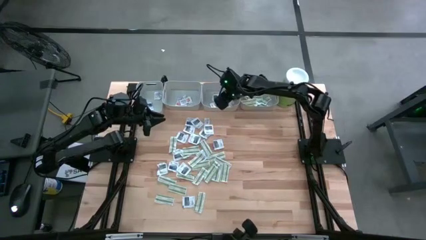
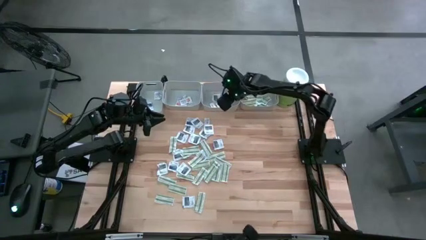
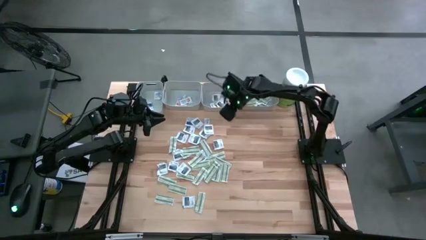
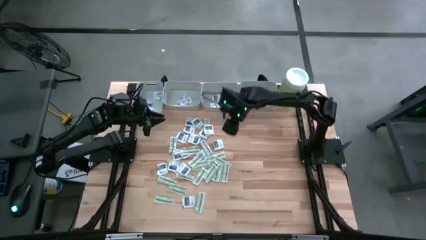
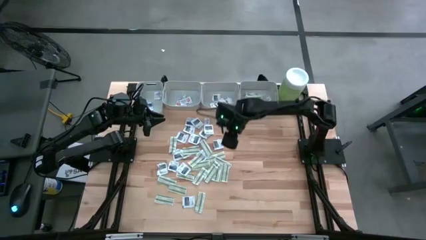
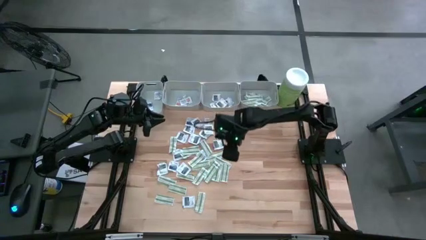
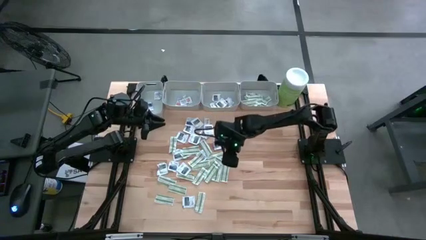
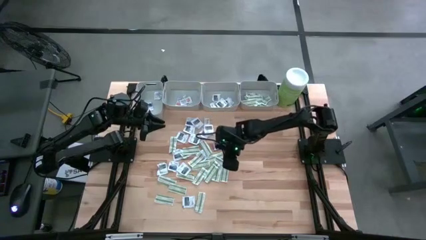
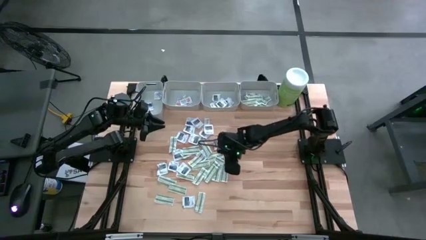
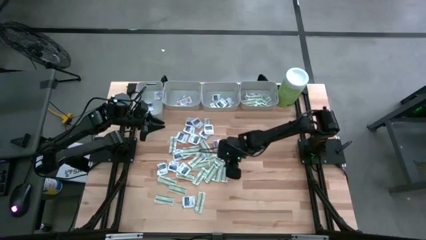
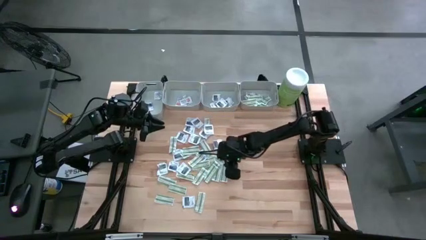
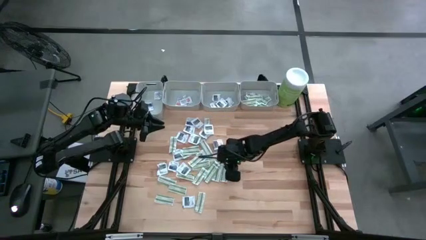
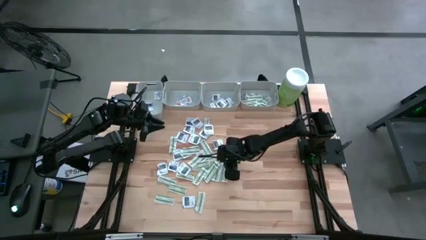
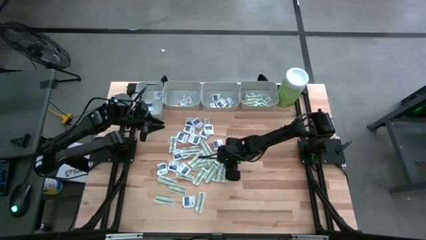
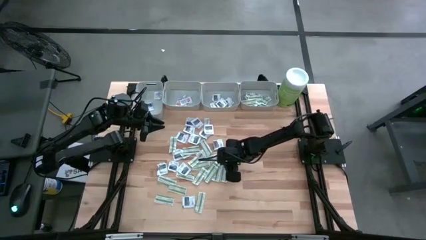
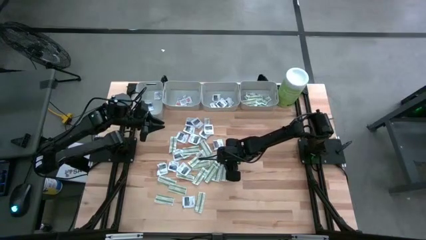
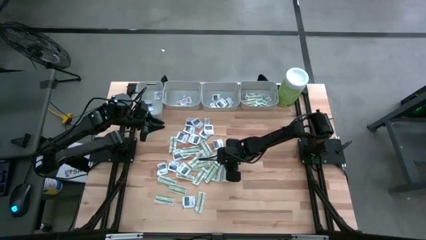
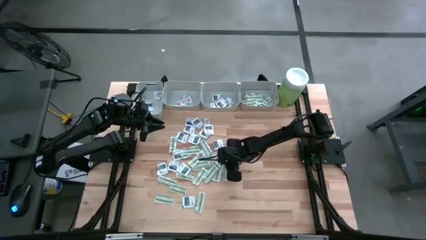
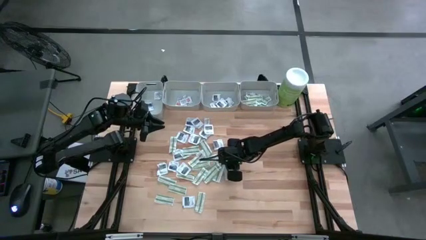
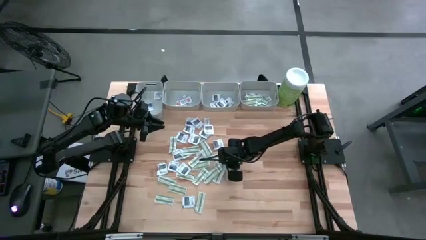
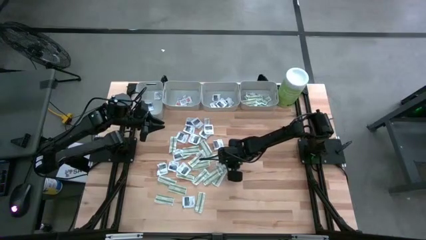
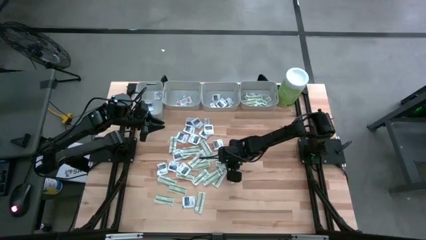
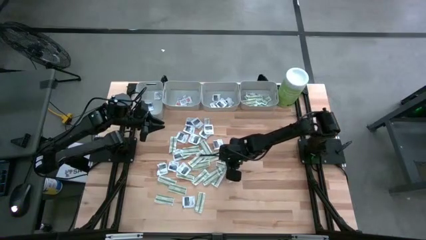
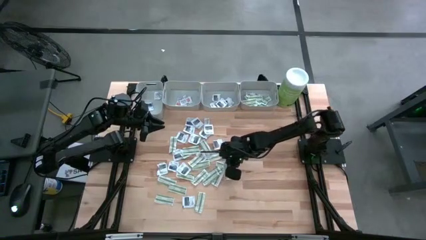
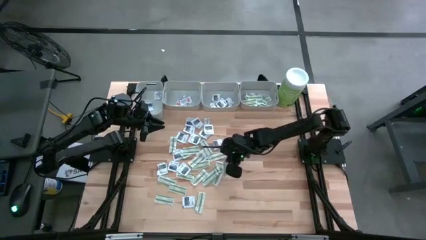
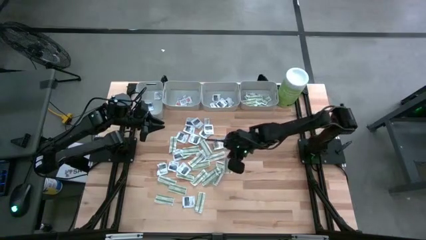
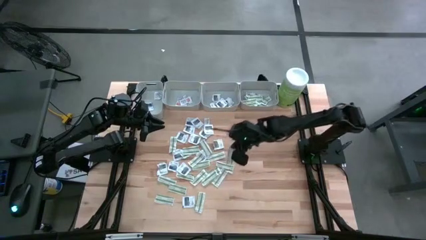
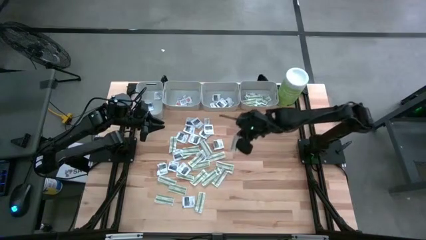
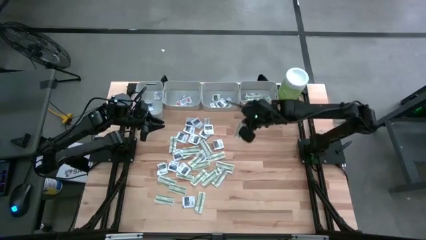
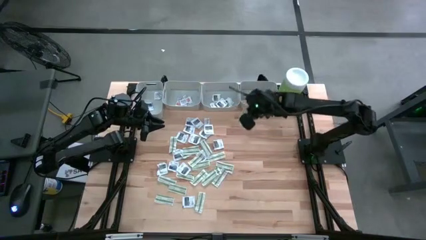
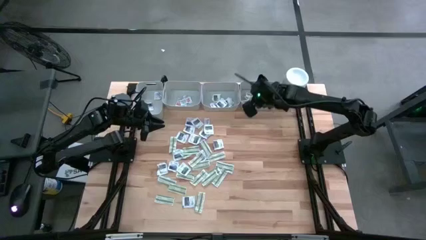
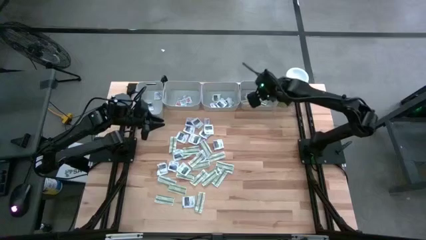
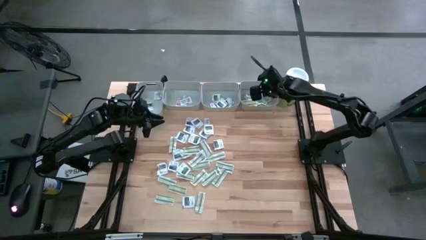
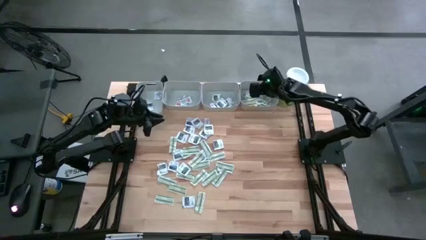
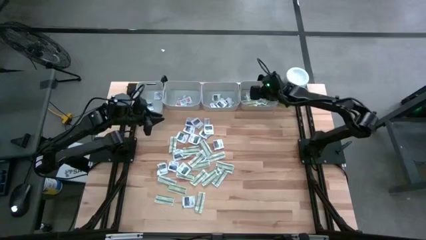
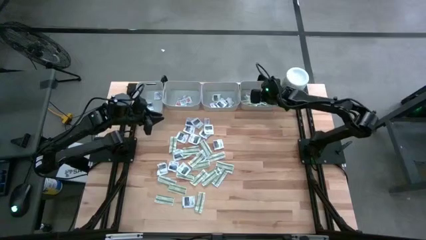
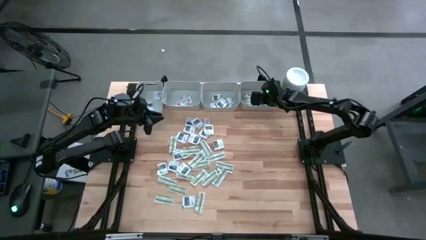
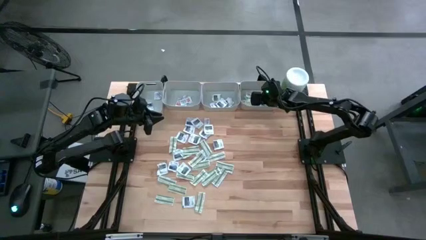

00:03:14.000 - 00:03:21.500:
Task: Pick & Place First Aid Supplies
Put the green bandage into the right gray bin

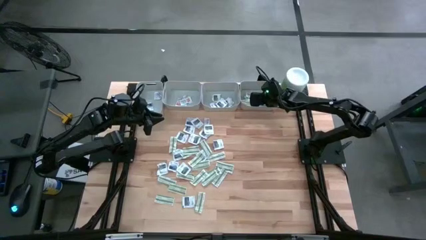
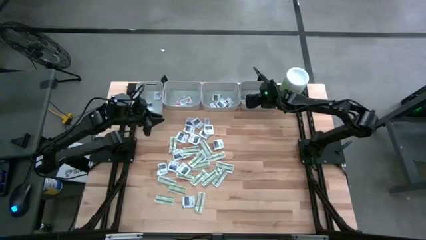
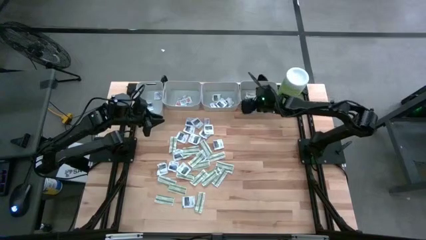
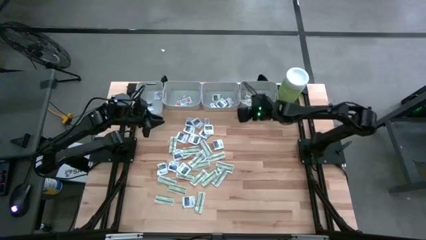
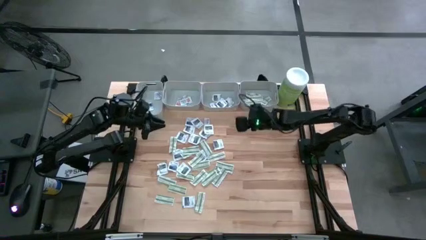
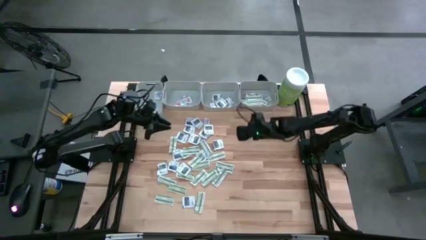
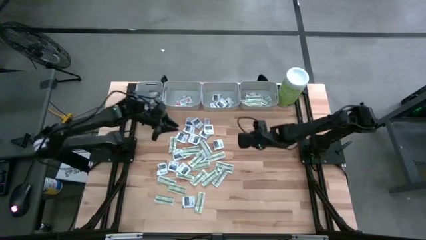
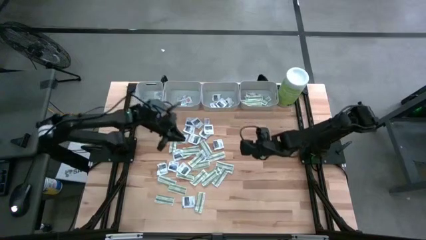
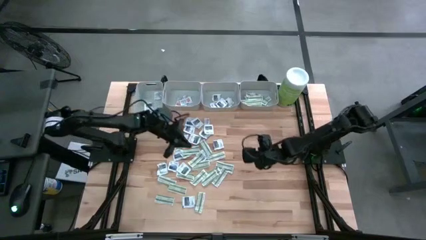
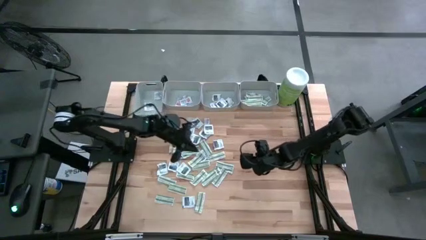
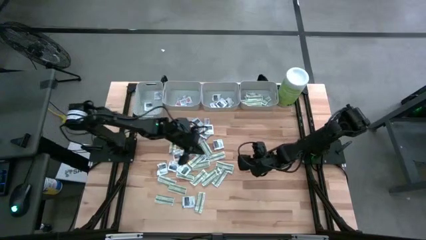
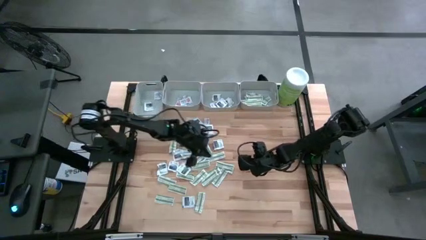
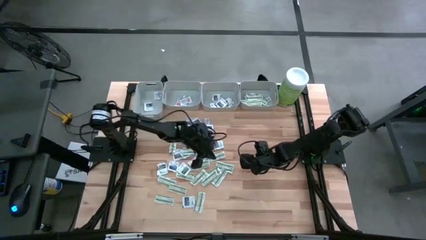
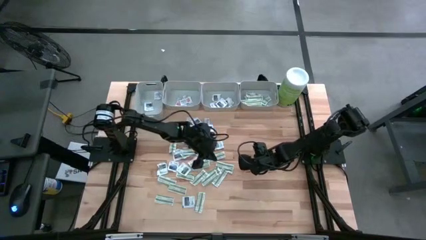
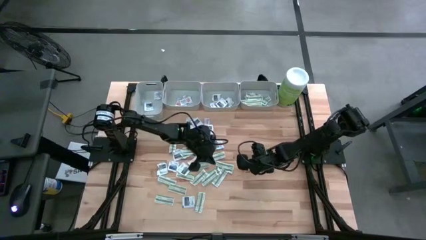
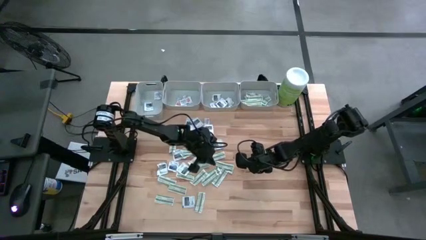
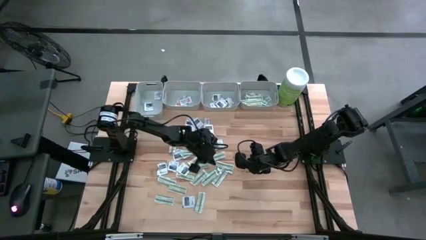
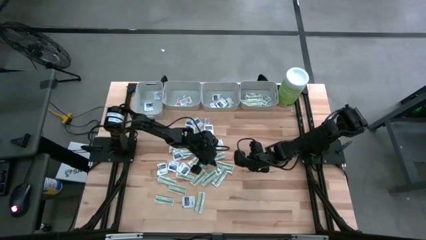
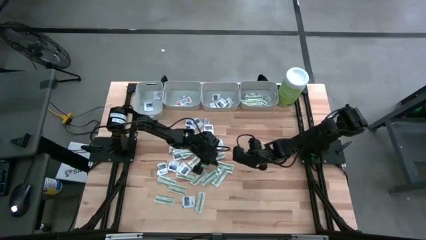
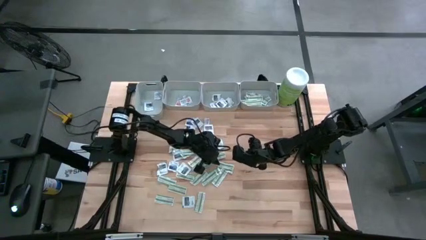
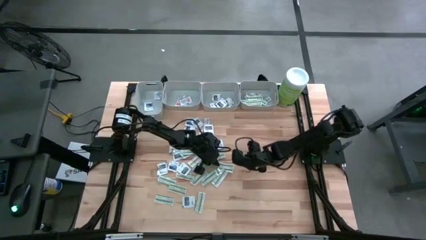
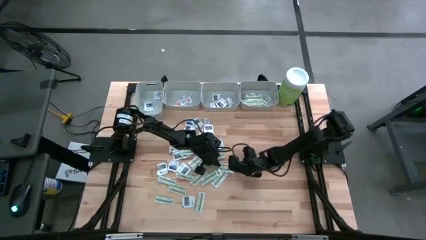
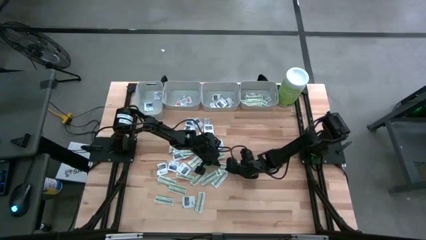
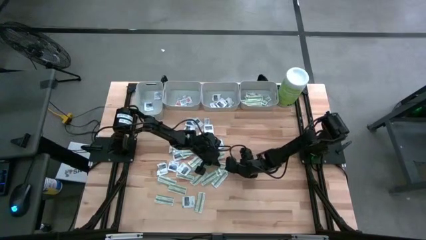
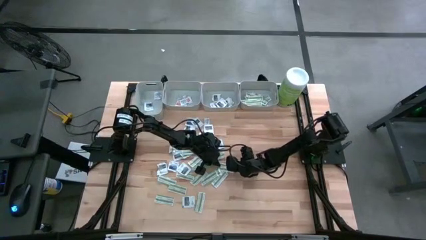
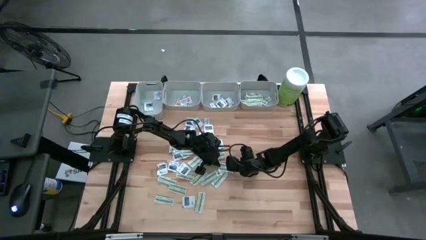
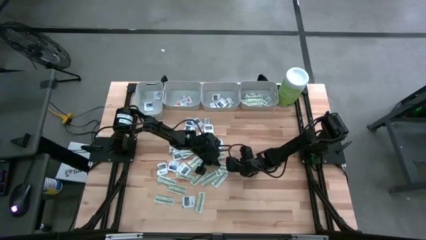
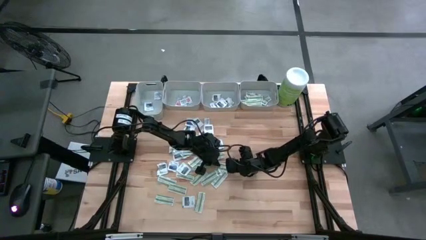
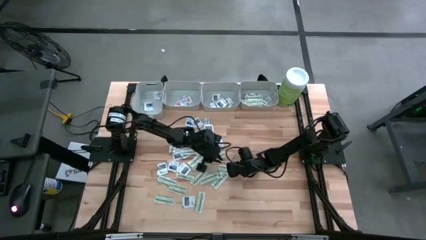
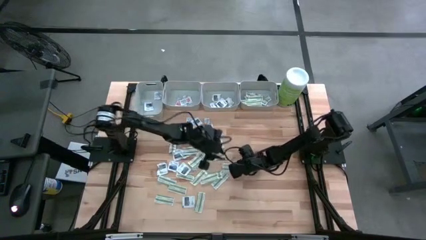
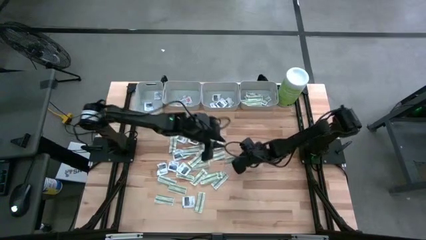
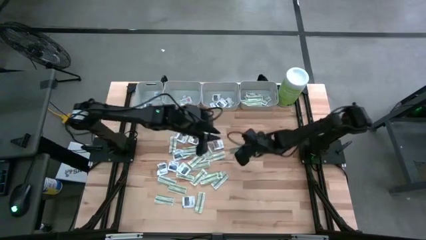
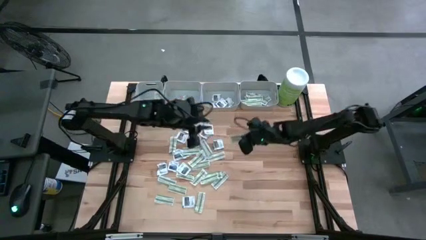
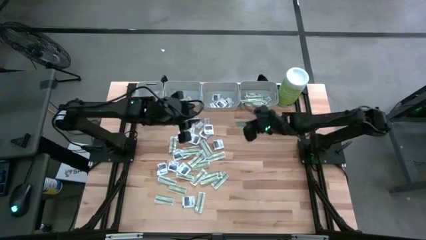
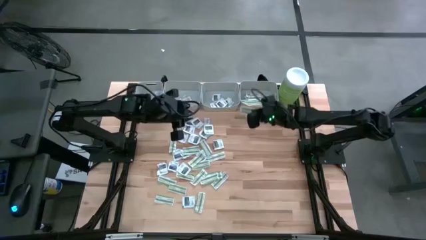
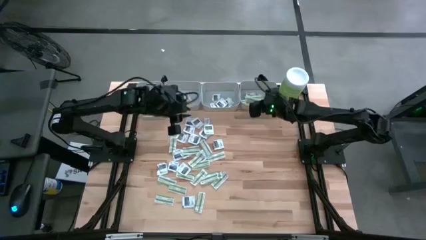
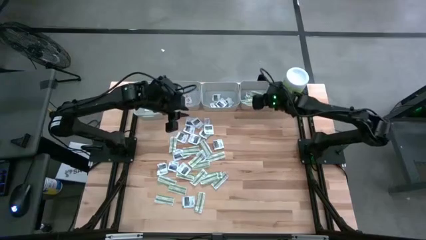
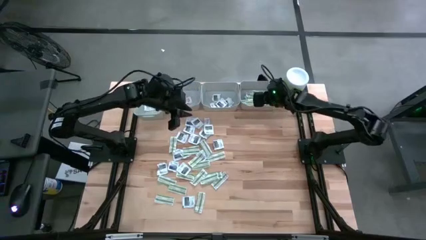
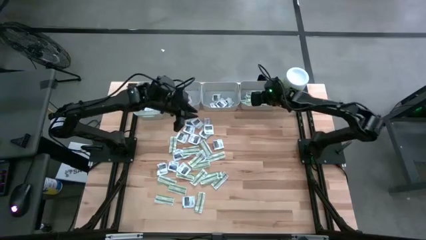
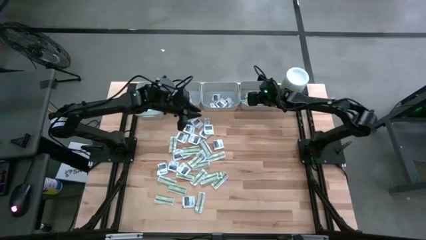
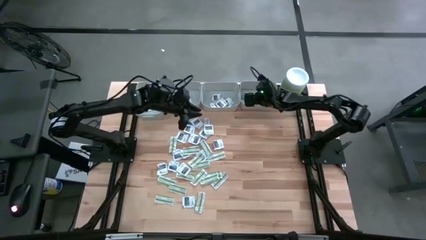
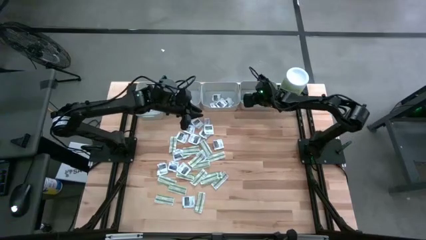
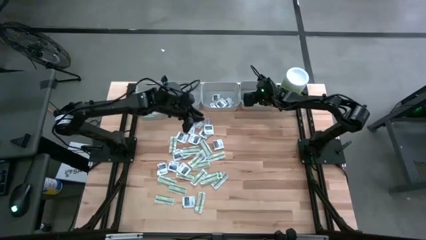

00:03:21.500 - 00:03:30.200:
Put the green bandage into the right gray bin
